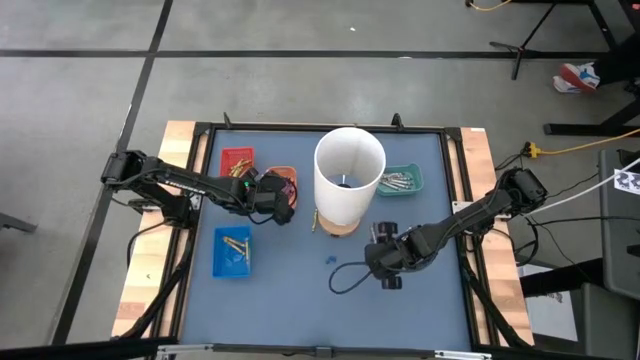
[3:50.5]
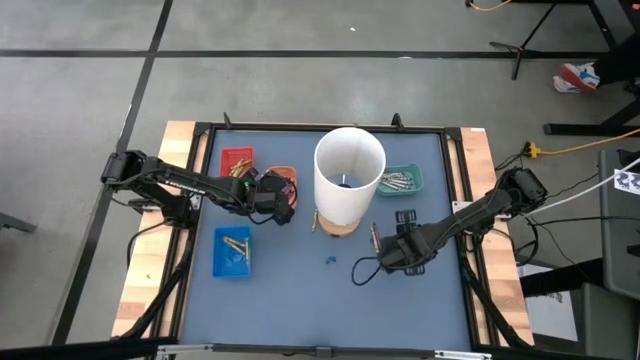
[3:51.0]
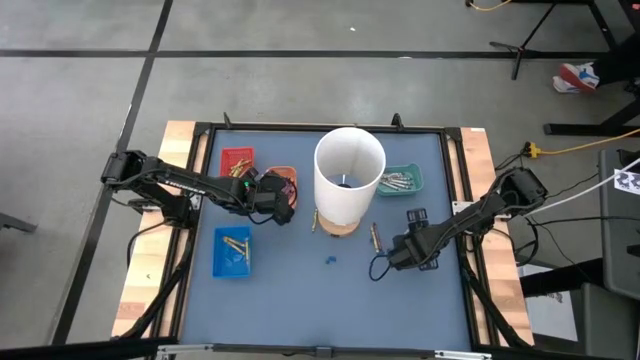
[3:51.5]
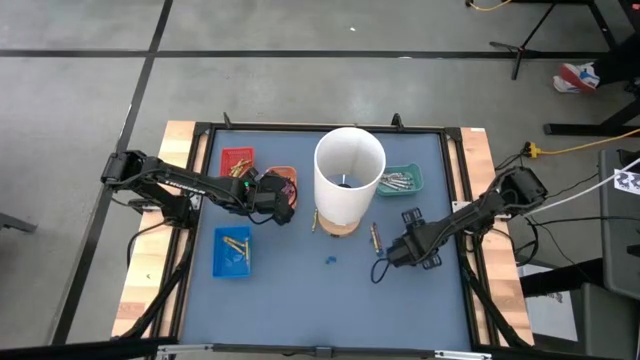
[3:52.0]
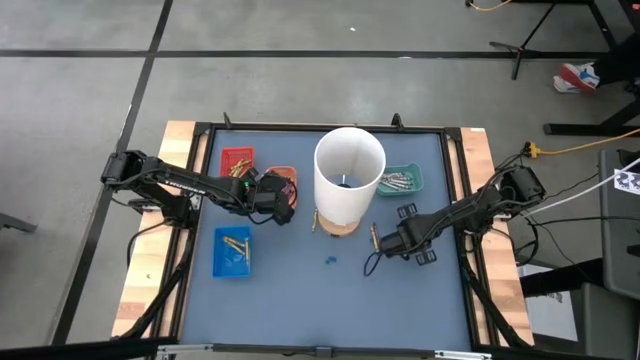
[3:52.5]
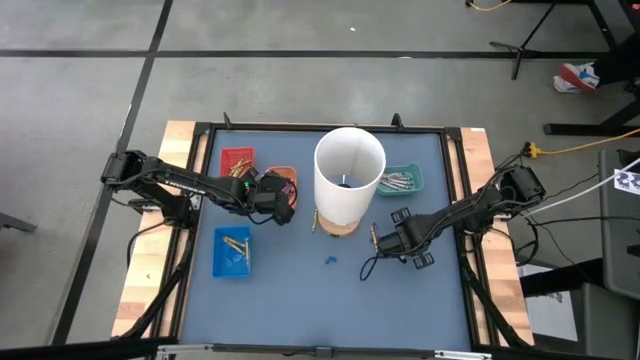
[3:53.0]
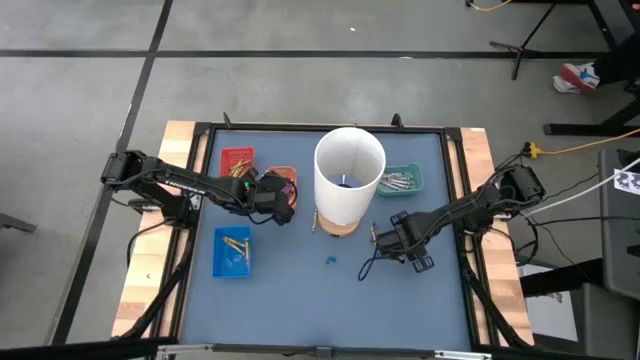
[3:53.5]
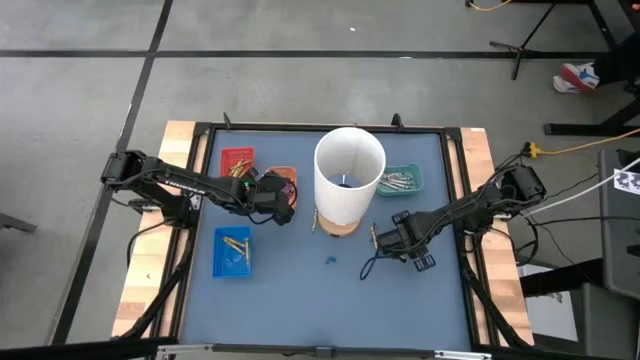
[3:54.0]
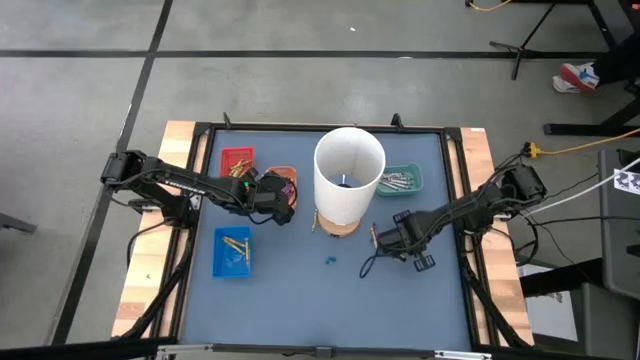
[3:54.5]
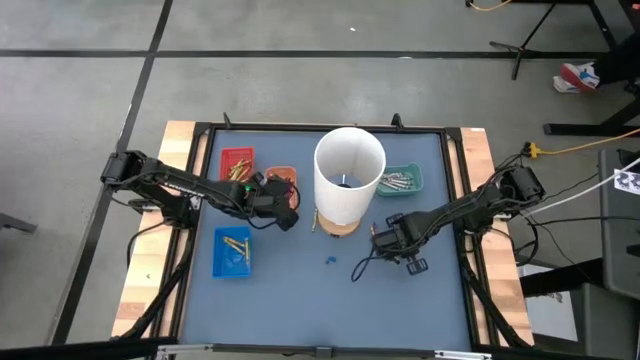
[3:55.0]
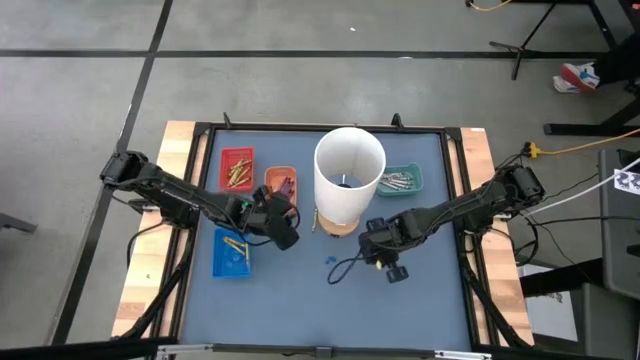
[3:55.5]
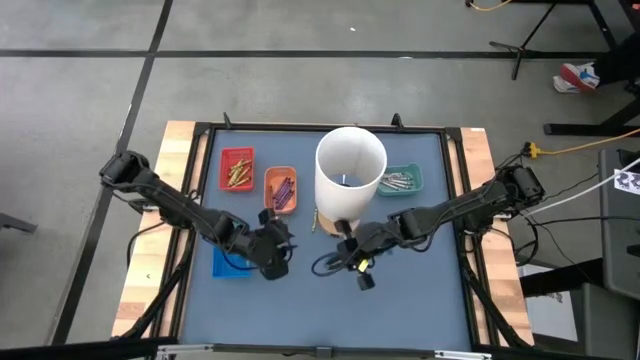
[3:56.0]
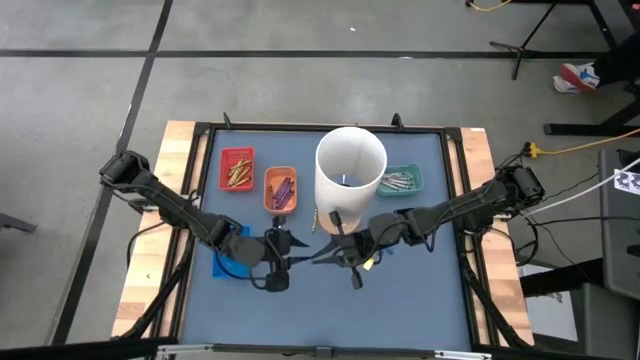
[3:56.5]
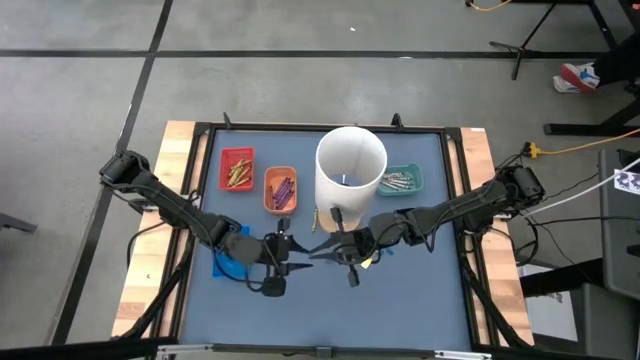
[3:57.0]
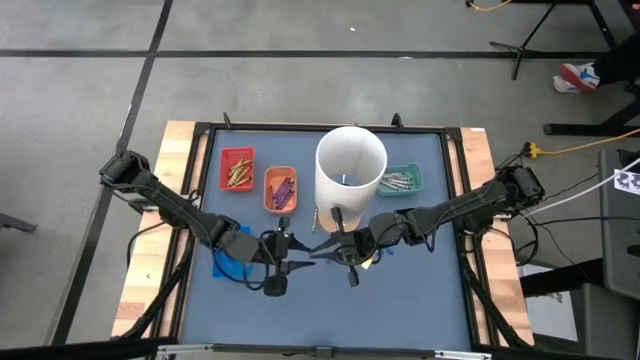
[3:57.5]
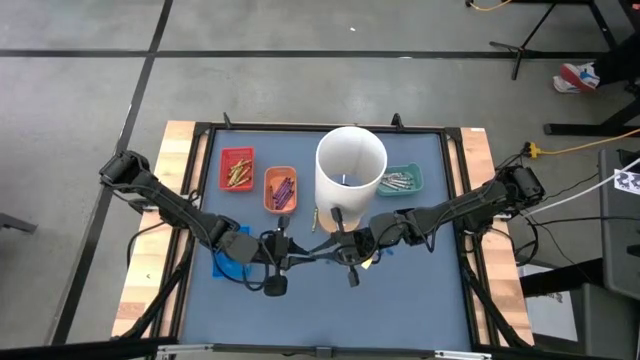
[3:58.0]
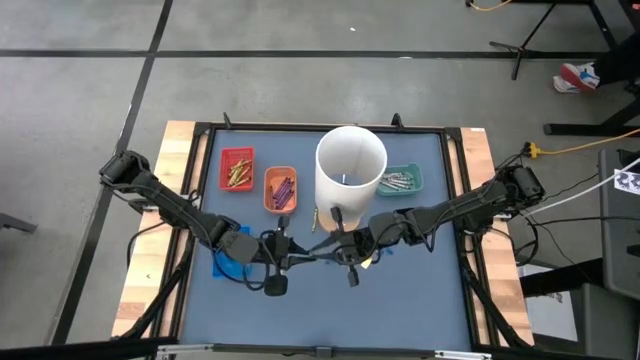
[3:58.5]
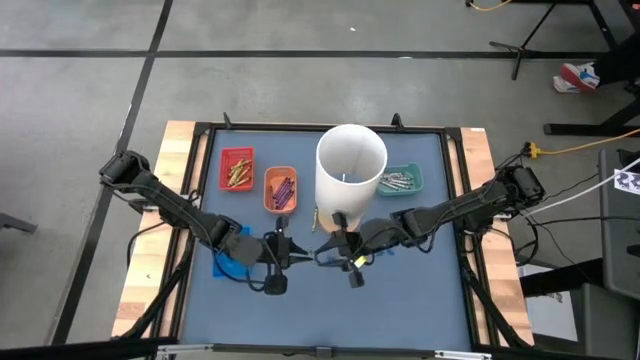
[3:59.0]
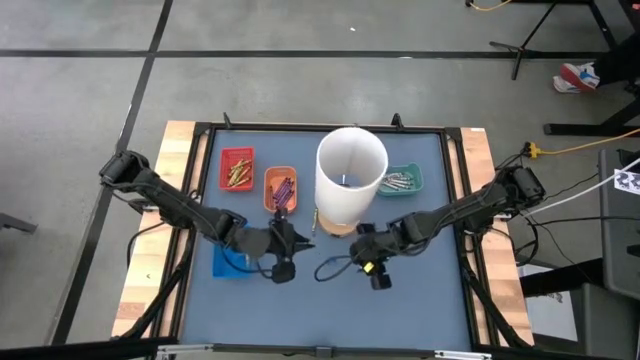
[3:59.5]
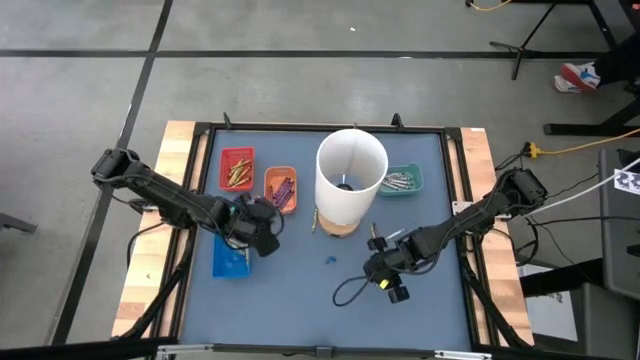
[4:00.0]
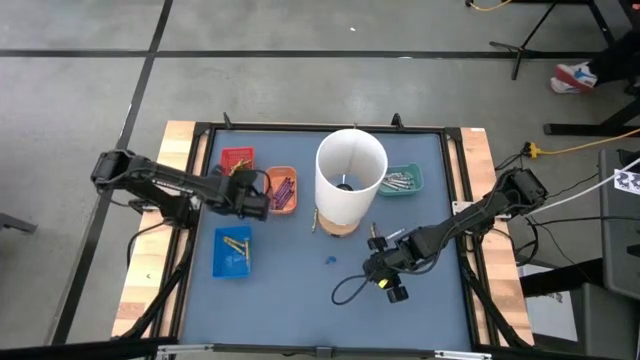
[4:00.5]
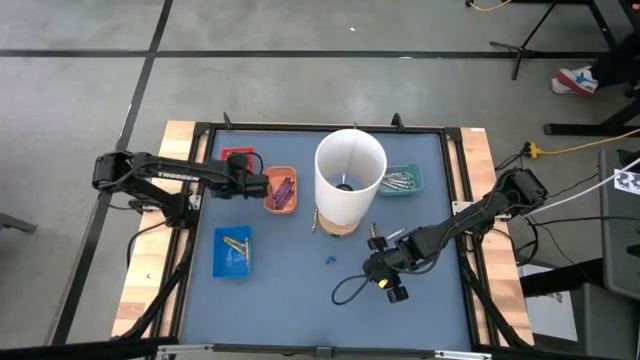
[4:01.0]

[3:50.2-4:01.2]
Task: Sort crayons
Put the green crayon into the red bin

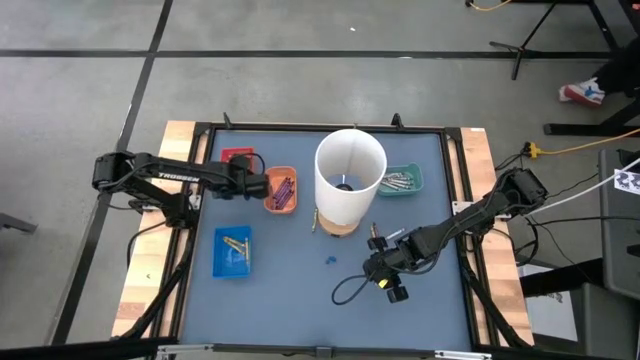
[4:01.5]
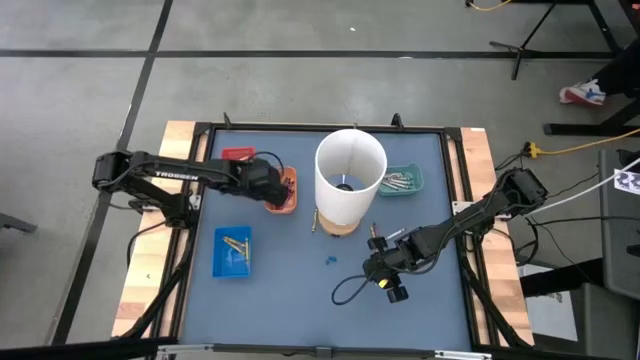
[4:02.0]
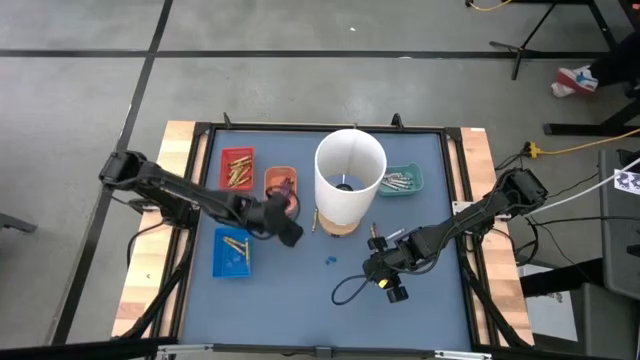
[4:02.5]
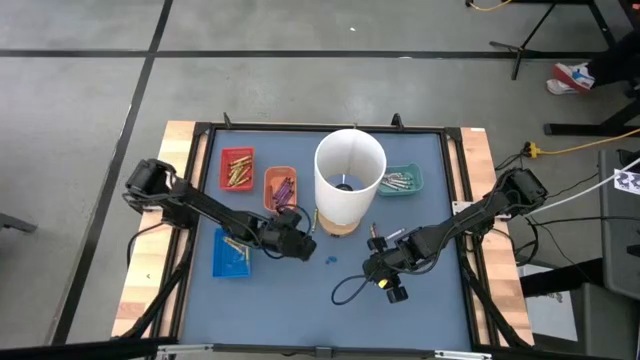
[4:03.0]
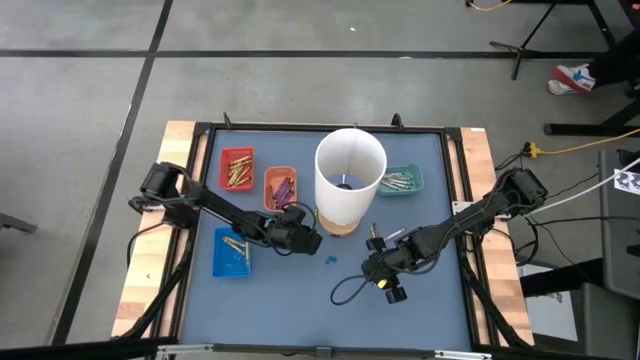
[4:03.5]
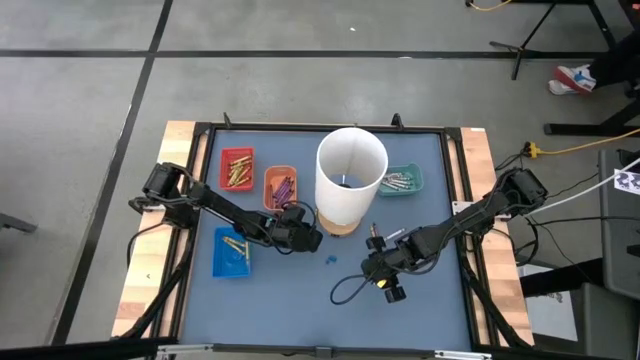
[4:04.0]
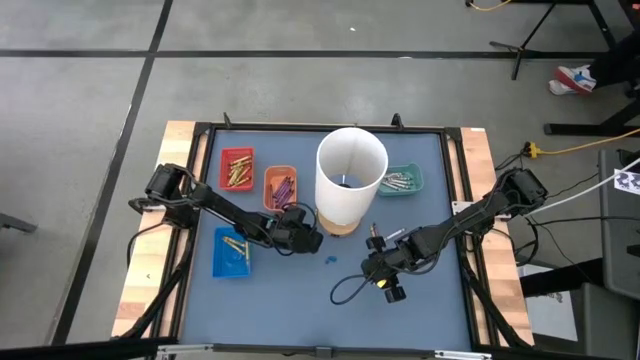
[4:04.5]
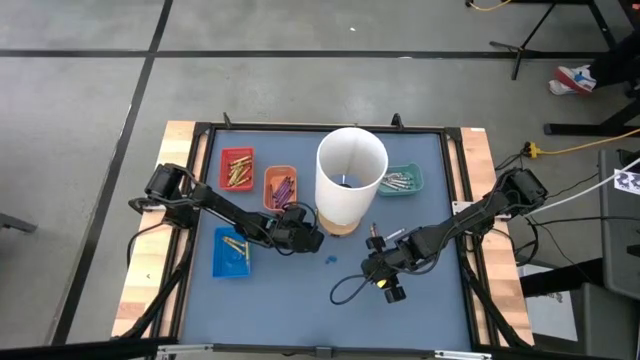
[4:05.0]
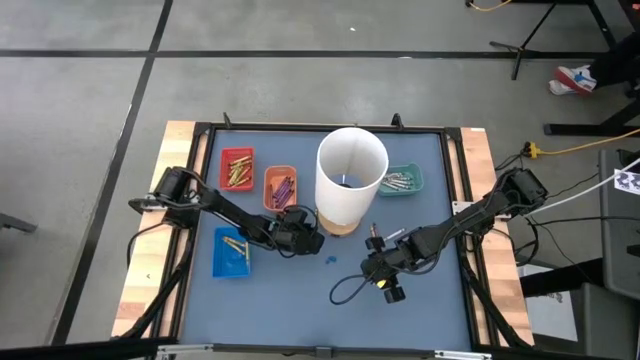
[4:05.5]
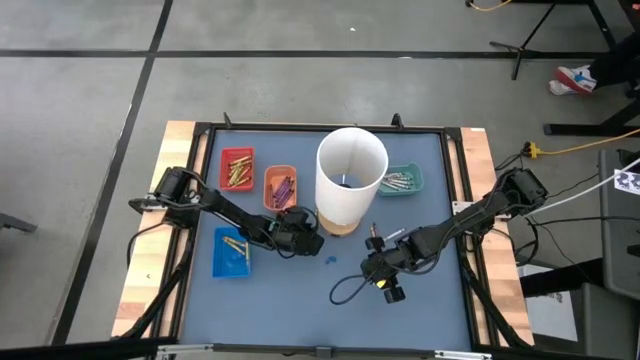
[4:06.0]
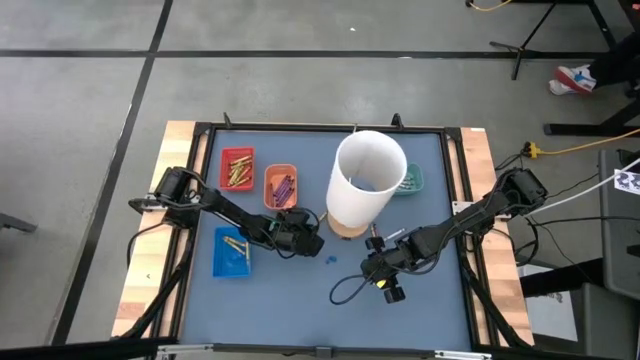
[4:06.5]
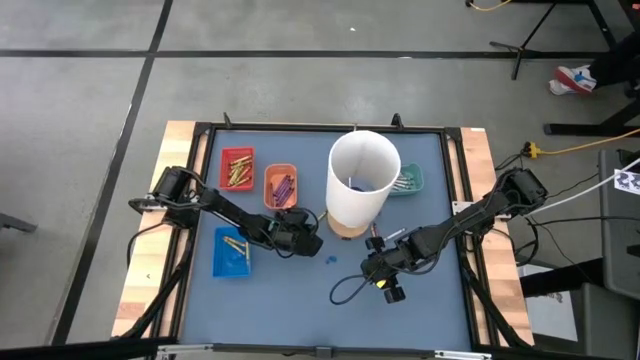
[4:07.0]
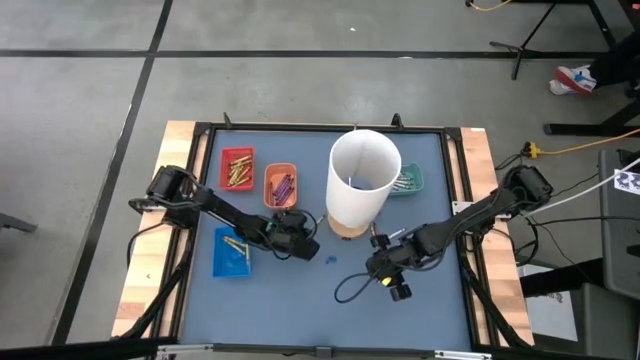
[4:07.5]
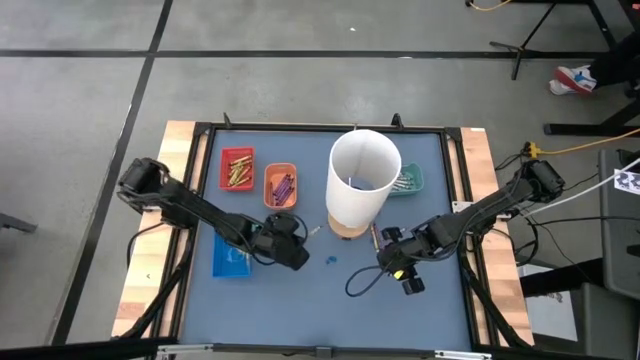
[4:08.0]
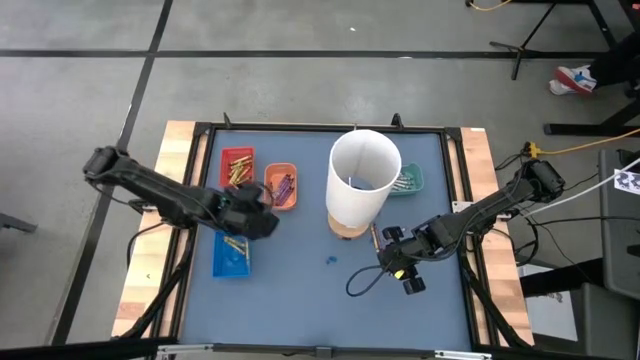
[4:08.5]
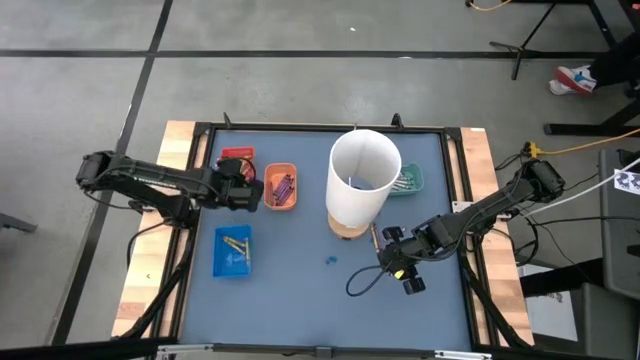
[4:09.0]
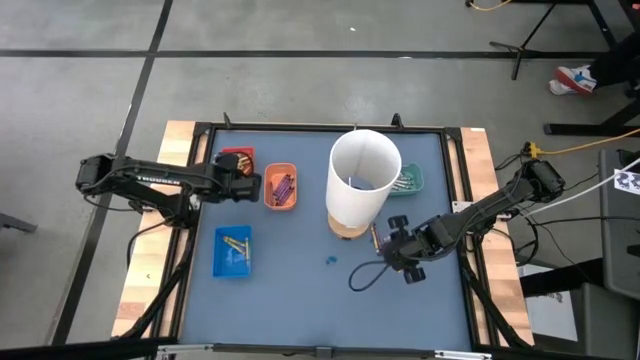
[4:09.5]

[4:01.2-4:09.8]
Put the green crayon into the red bin

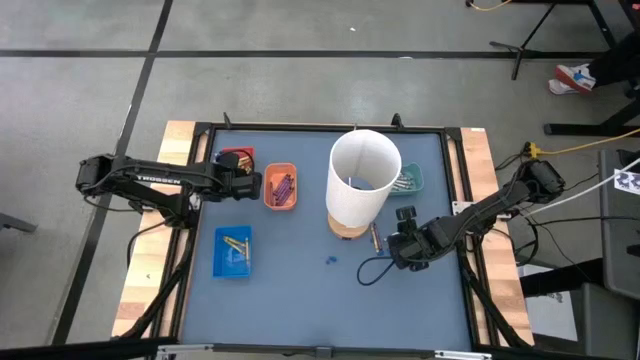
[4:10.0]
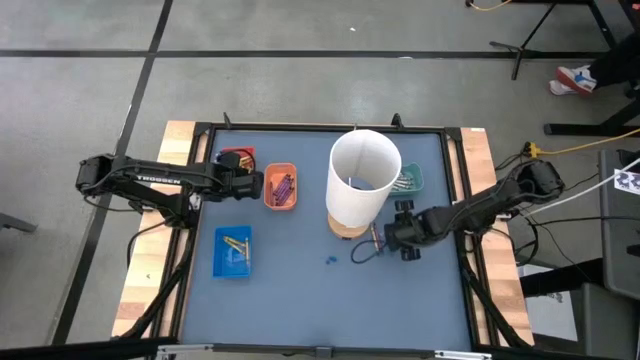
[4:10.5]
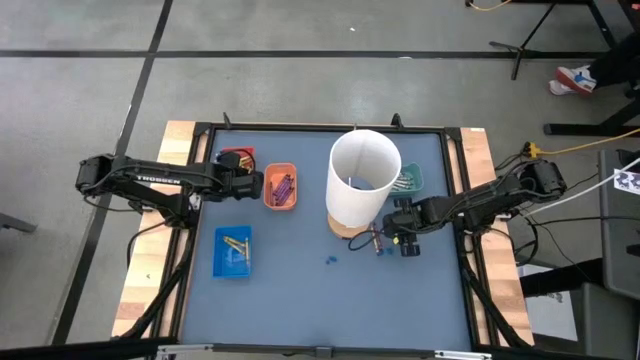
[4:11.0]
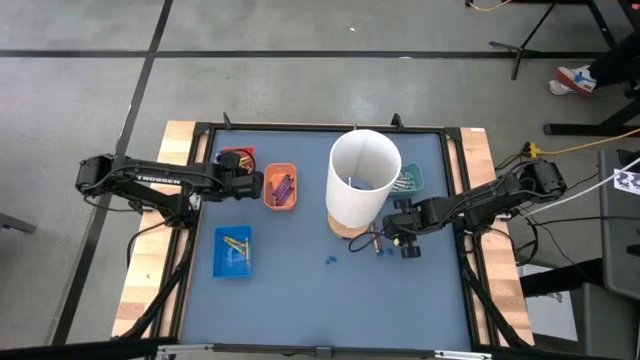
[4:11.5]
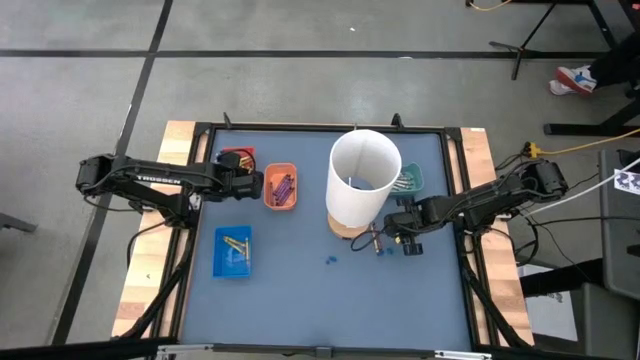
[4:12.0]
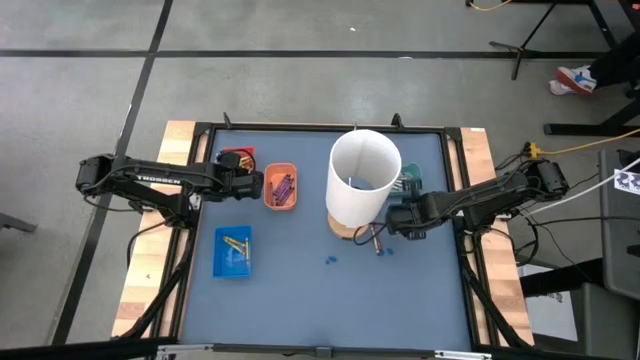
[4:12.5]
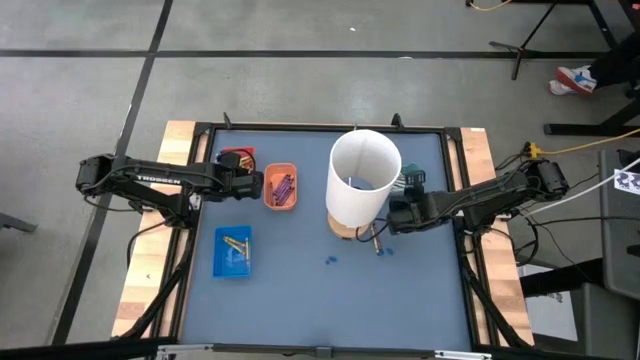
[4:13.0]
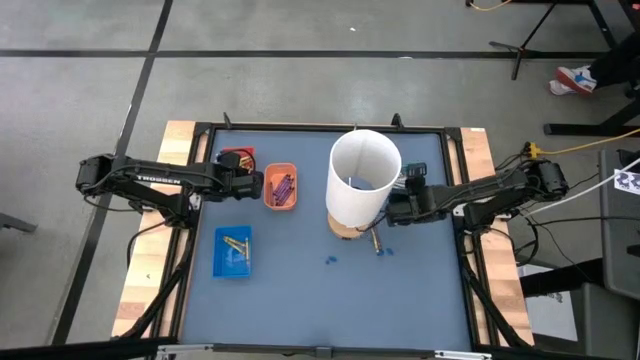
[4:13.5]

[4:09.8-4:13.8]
Put the gray crayon into the green bin
